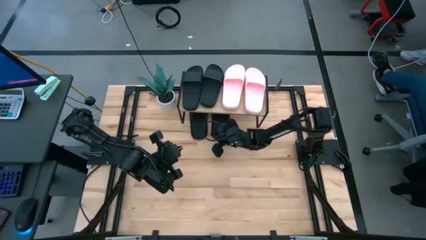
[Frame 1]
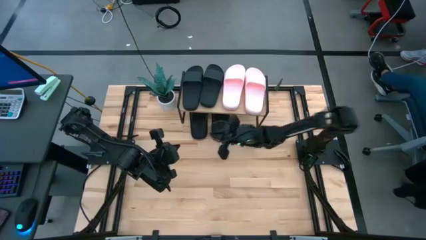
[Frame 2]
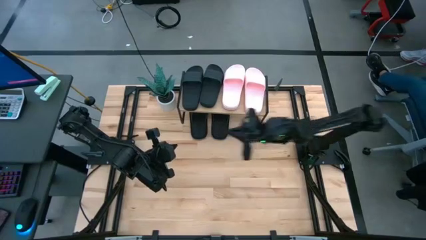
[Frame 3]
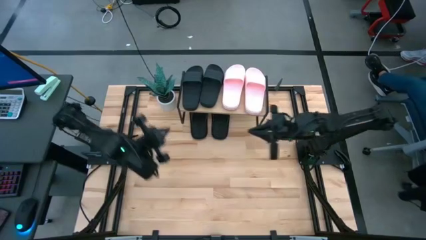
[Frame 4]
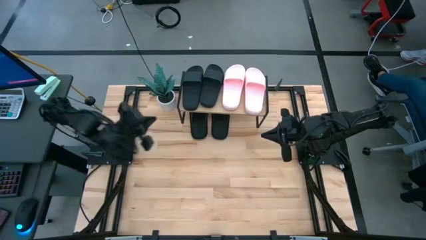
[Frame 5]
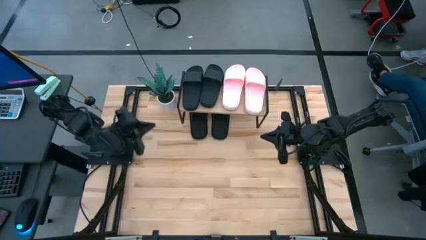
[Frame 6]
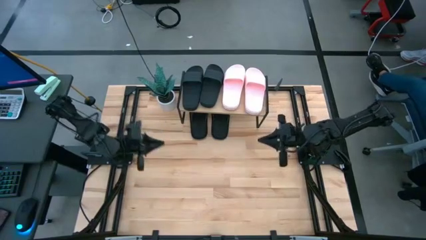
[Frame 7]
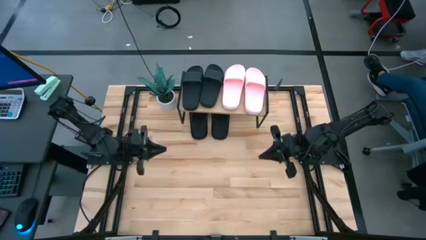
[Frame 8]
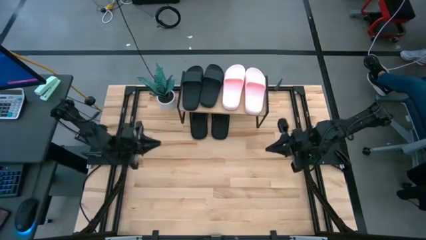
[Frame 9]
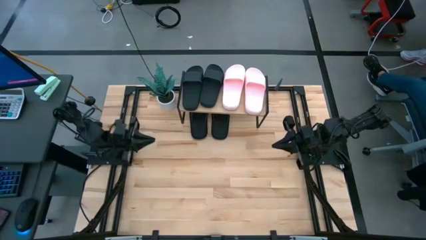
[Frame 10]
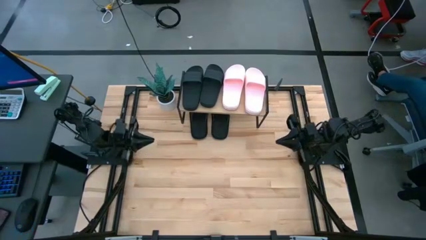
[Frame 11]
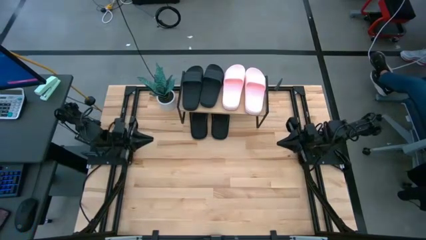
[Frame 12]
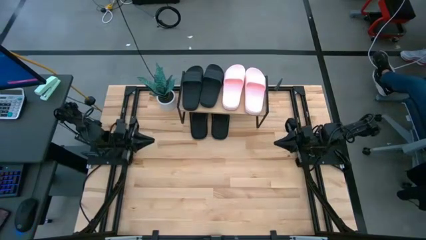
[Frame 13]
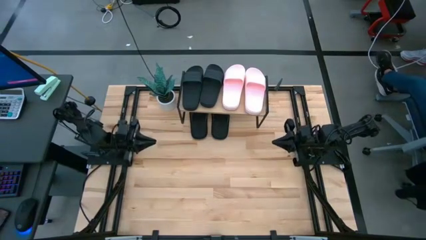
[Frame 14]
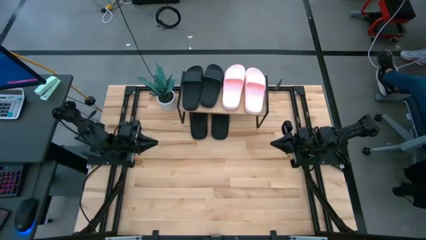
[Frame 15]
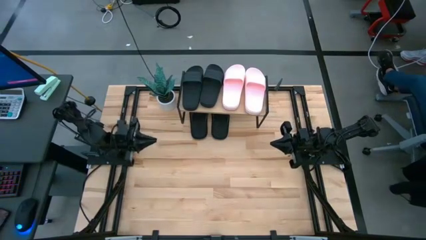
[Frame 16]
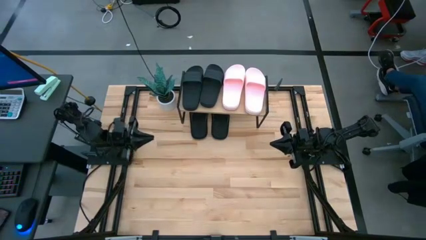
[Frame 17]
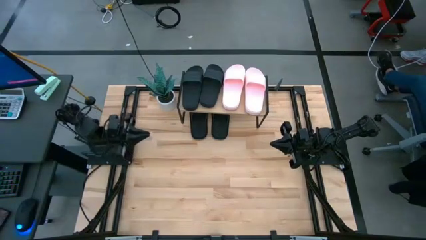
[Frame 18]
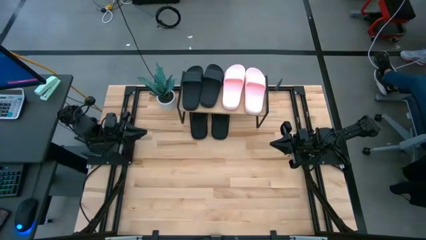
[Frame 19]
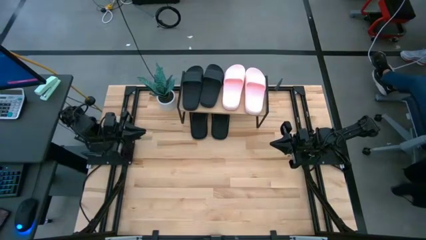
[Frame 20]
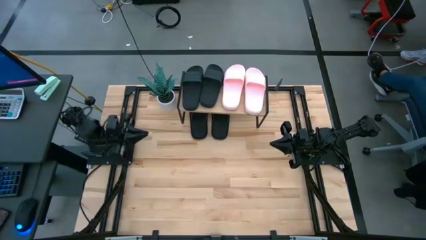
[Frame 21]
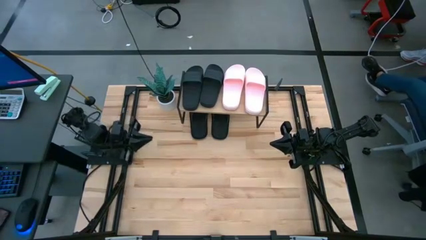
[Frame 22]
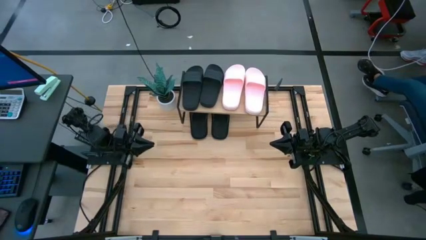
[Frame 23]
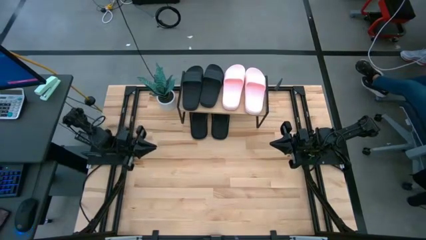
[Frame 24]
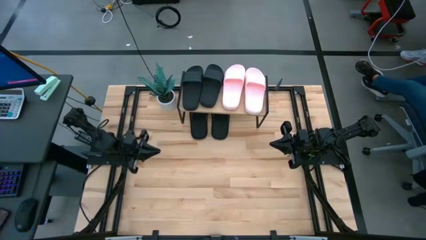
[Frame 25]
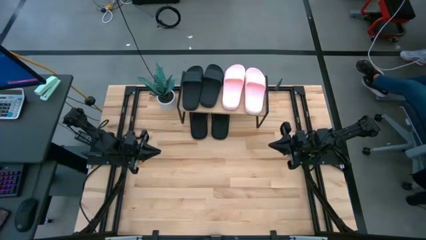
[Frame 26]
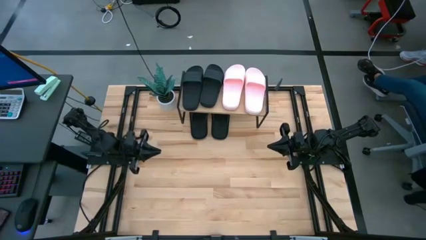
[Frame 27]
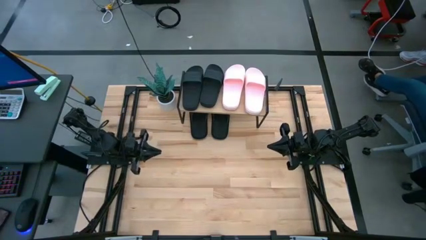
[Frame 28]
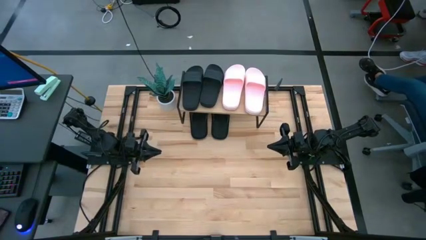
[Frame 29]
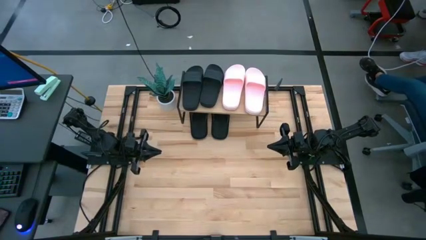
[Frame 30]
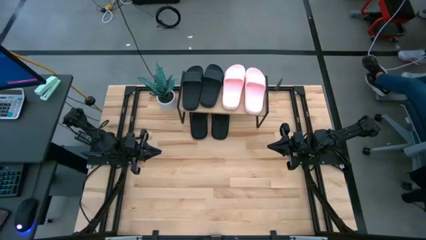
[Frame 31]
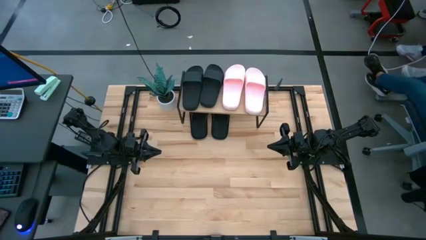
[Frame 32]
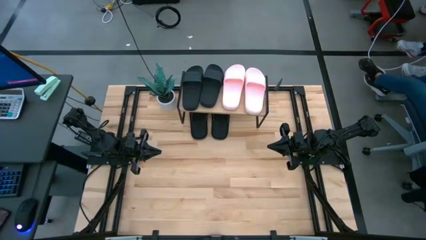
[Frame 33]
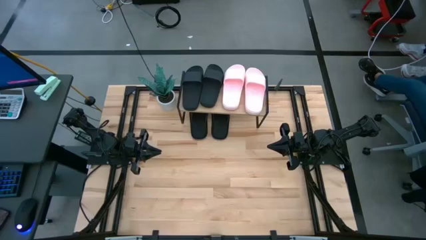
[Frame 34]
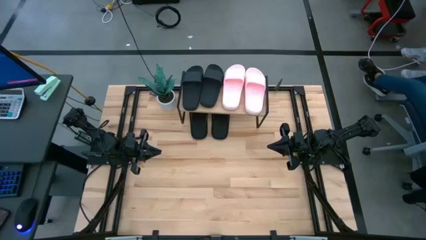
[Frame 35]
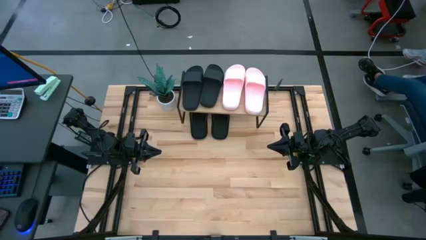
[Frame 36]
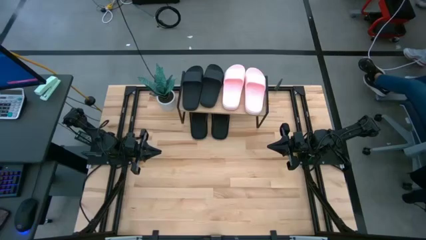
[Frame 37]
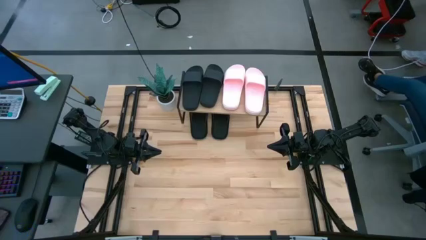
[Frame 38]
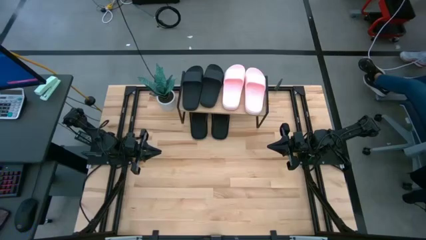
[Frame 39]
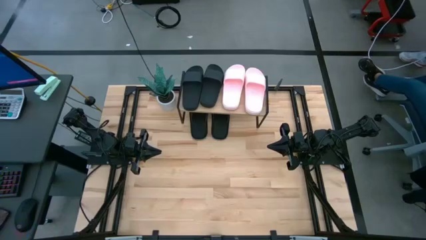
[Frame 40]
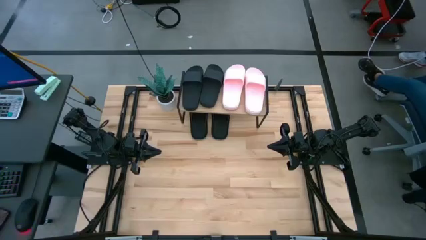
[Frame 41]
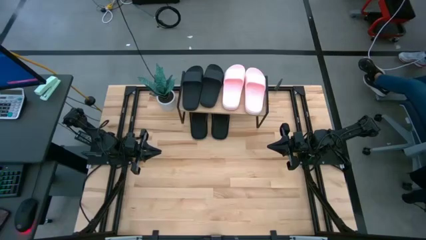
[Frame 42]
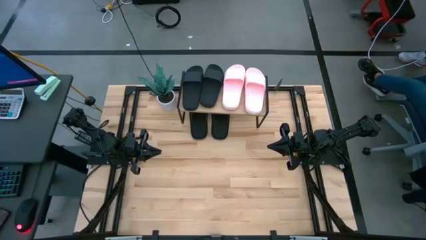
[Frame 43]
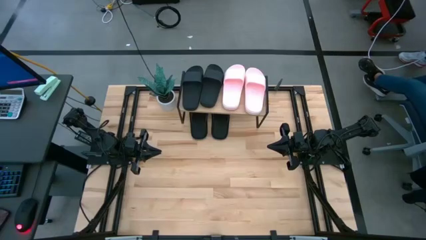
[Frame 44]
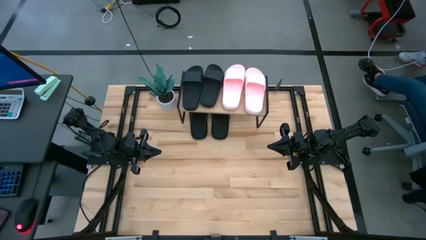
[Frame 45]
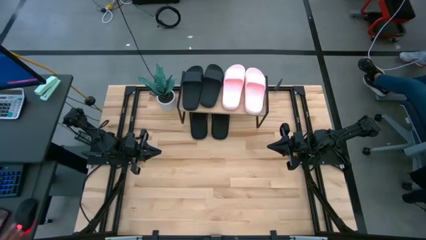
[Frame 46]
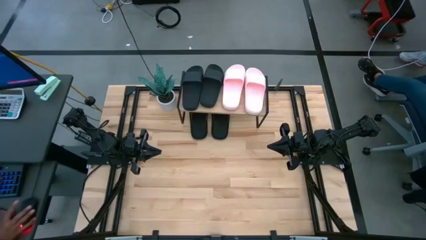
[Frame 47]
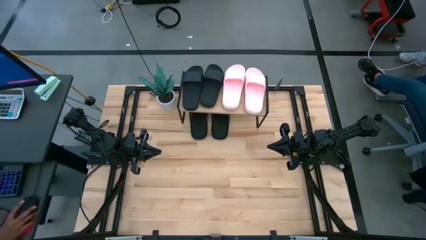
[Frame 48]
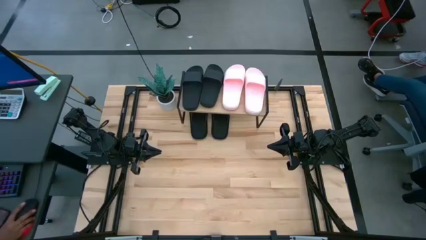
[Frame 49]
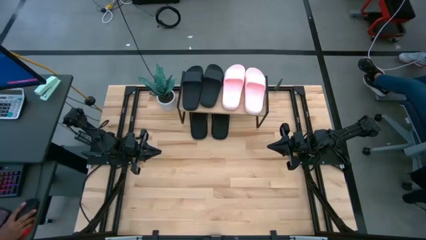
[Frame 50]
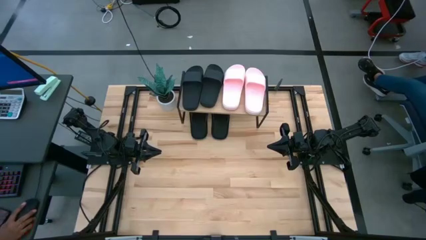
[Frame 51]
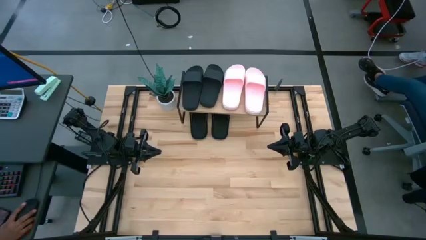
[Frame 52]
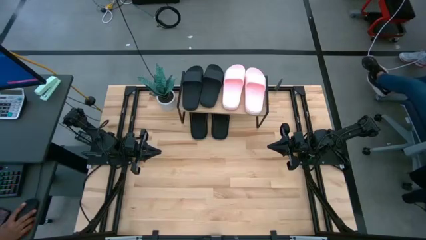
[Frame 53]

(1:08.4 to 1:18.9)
Task: Pick and place slides into the shelf
Return to Home Position
